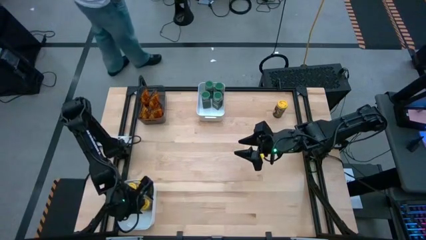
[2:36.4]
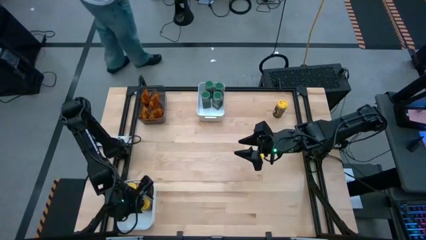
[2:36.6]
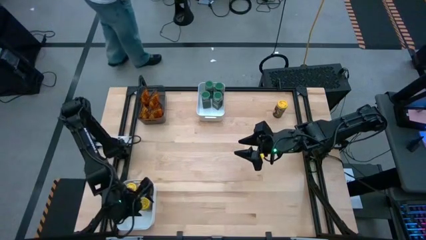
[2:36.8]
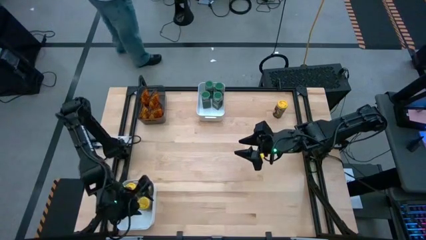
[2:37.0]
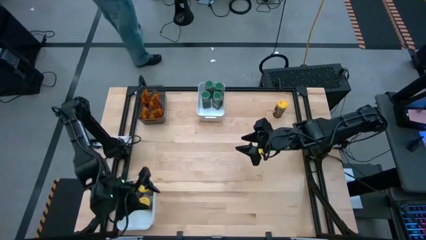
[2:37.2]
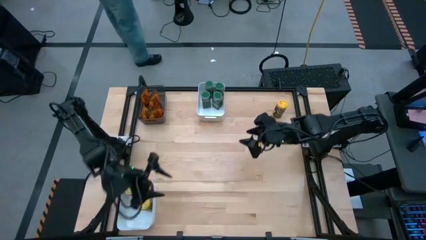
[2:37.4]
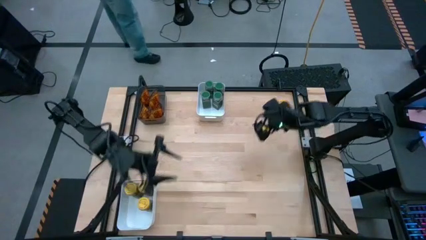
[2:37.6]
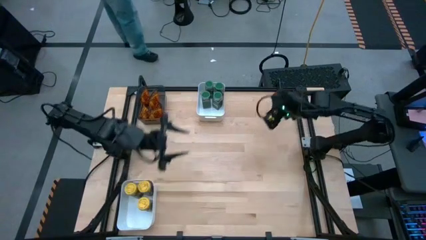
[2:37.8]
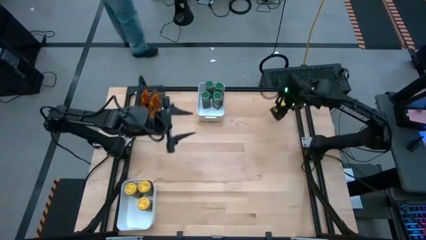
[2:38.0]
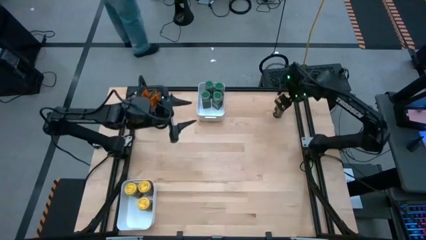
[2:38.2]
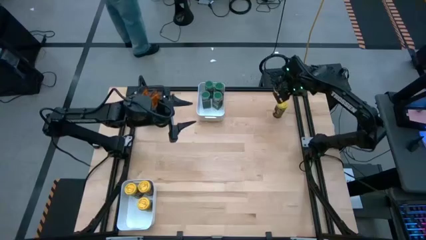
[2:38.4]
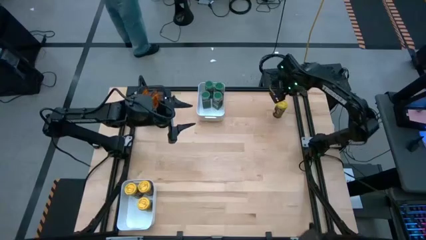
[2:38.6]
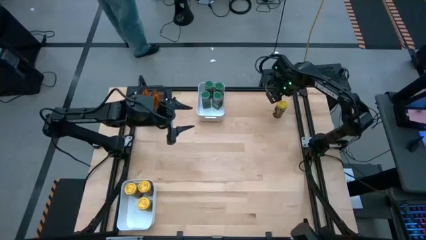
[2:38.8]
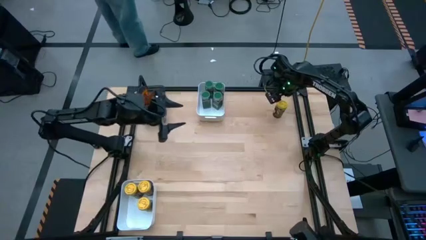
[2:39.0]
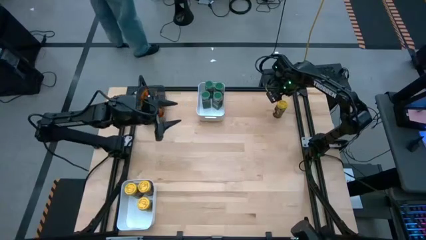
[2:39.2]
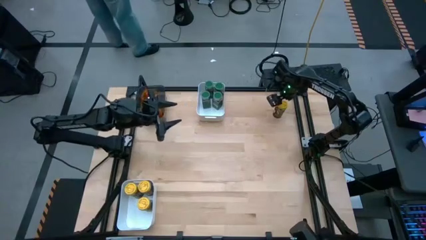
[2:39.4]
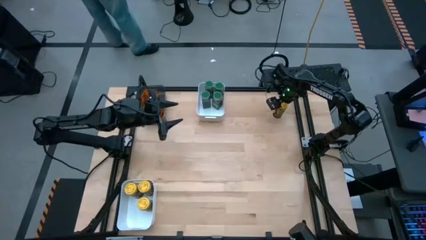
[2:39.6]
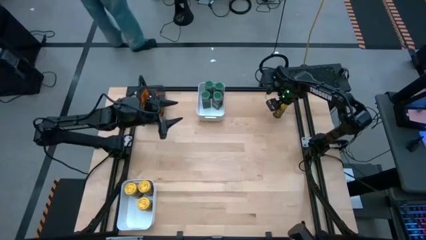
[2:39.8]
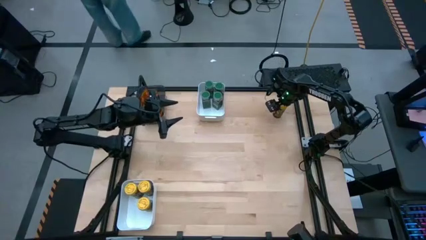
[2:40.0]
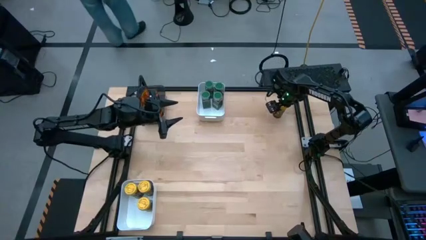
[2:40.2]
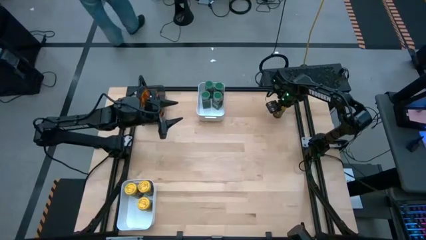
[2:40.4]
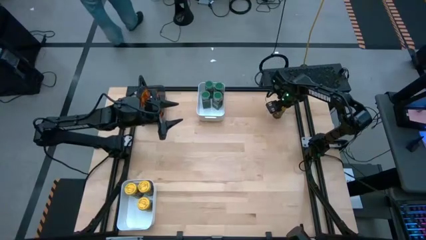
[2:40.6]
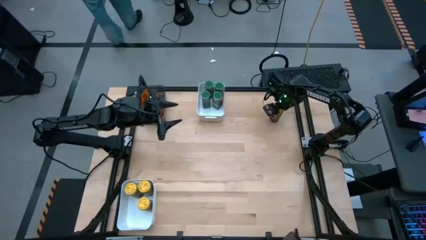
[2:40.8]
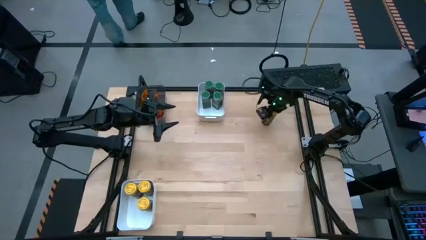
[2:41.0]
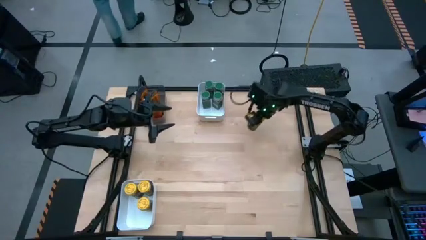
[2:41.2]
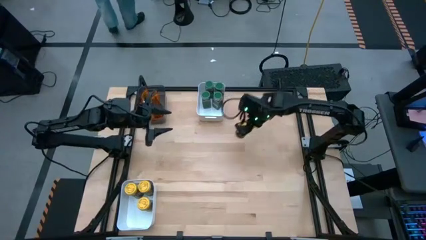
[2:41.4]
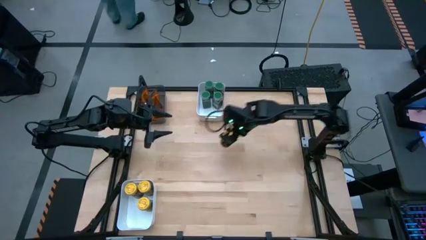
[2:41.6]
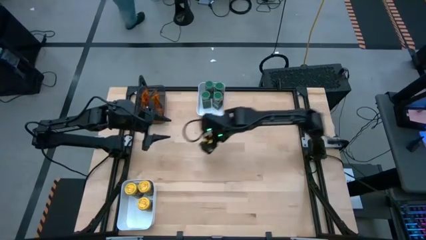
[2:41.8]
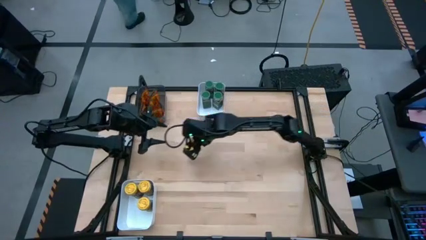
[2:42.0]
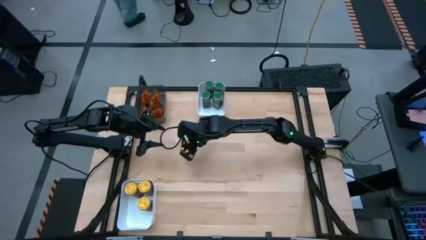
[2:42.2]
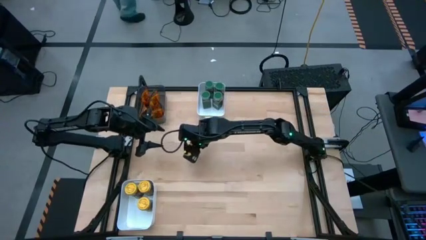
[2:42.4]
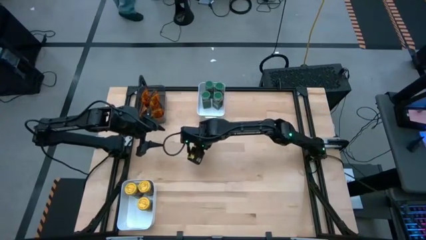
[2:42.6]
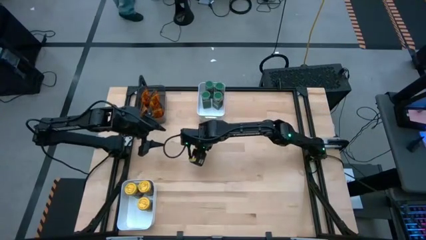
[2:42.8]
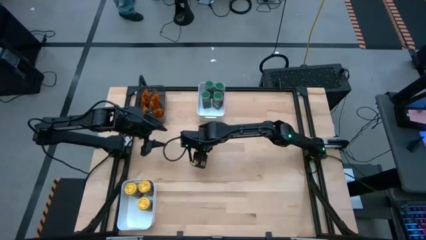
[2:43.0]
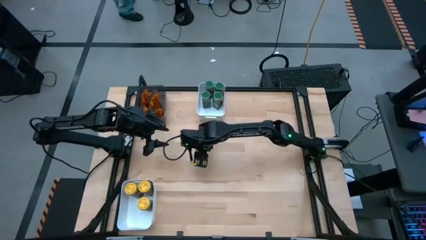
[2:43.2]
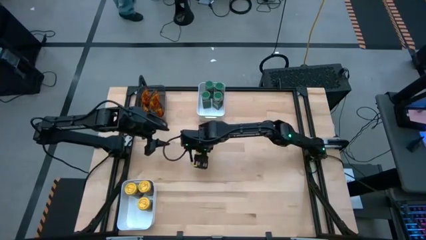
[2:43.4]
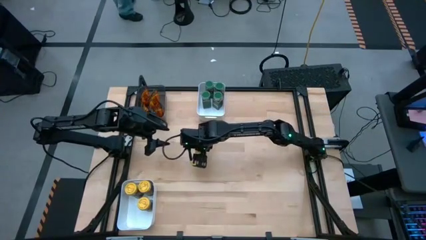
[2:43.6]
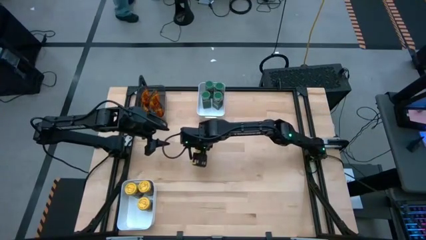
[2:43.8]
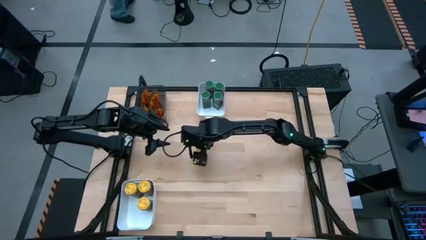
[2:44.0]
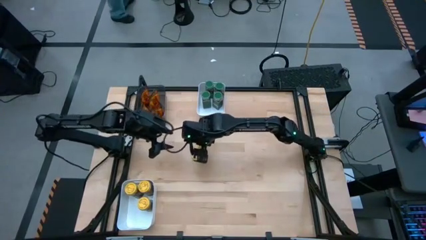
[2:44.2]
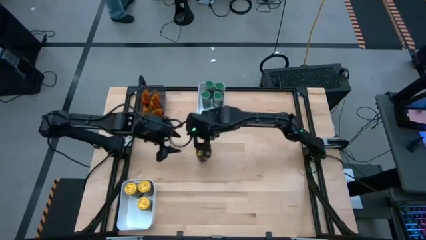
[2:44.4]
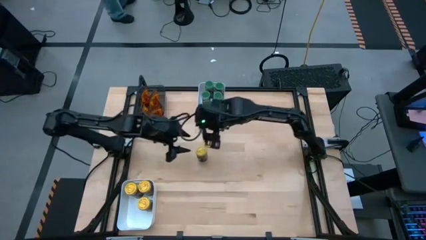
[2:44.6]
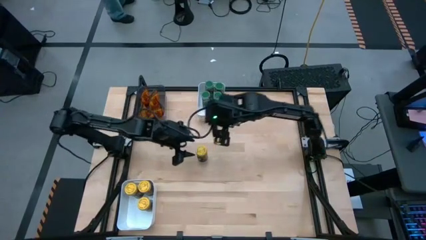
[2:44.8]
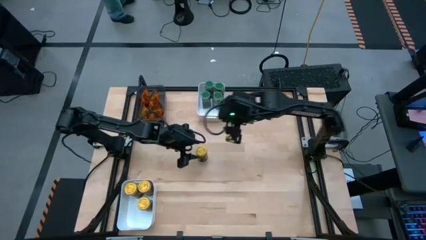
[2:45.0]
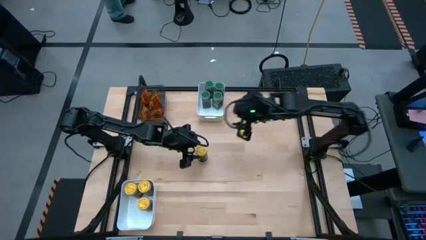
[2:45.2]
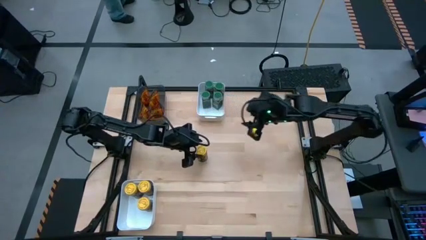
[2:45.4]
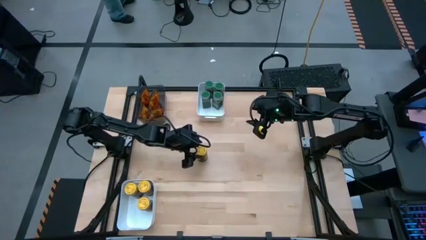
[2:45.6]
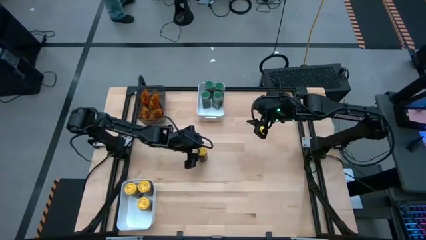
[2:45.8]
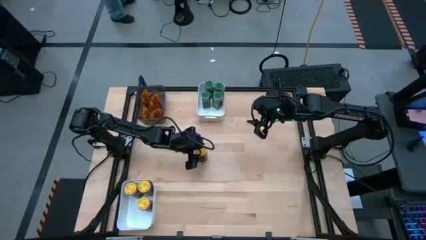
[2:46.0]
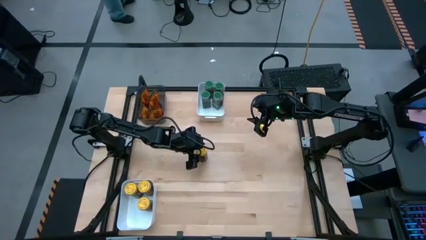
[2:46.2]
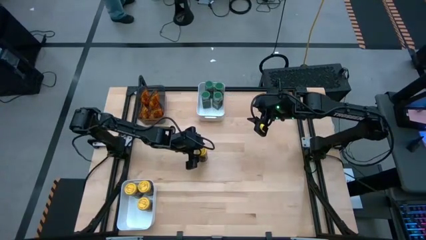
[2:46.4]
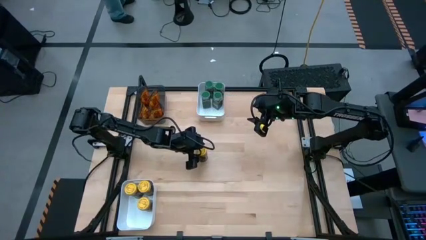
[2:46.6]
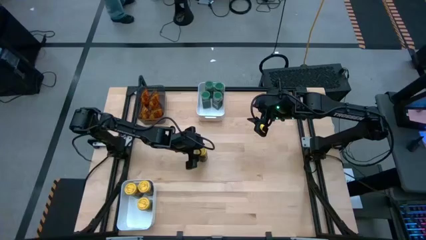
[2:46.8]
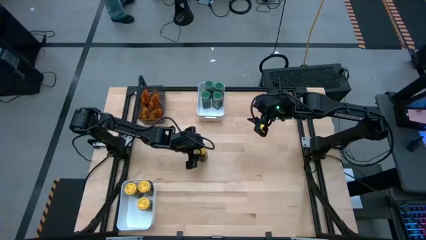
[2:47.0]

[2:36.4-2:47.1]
Task: Sort spices by type
Put the yellow seasoning bottle into the bottom white bin

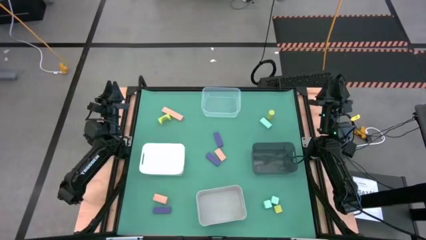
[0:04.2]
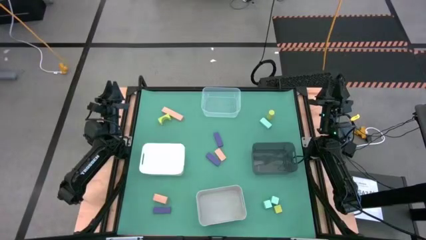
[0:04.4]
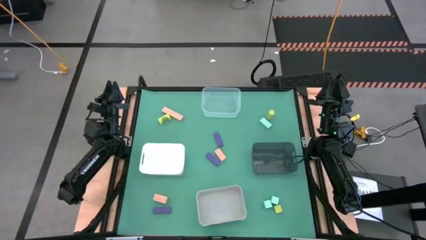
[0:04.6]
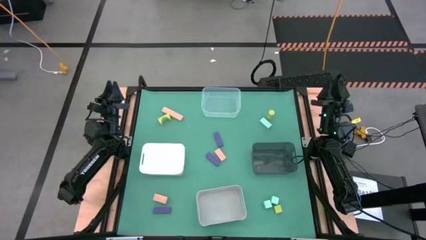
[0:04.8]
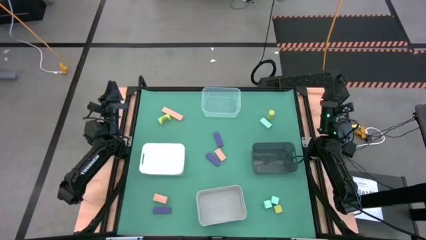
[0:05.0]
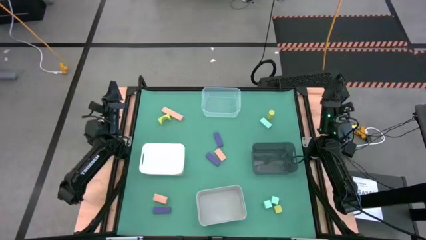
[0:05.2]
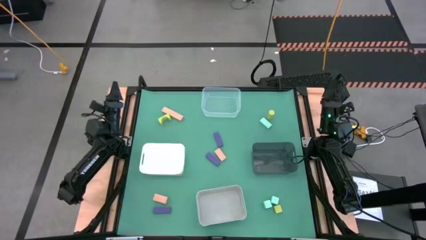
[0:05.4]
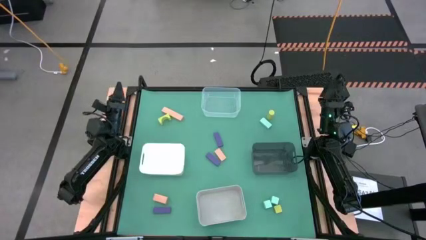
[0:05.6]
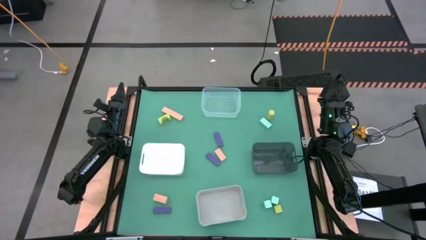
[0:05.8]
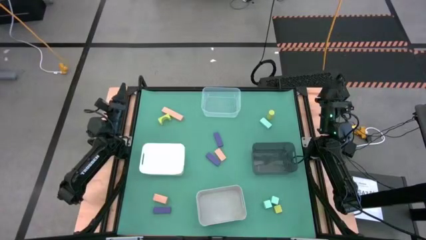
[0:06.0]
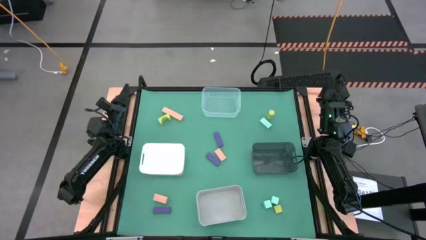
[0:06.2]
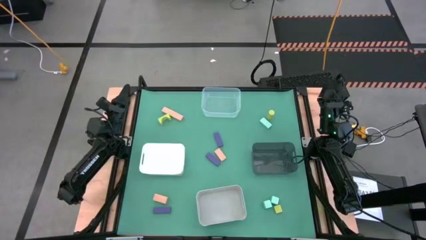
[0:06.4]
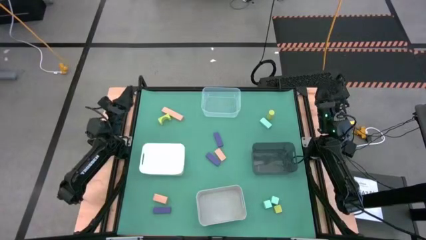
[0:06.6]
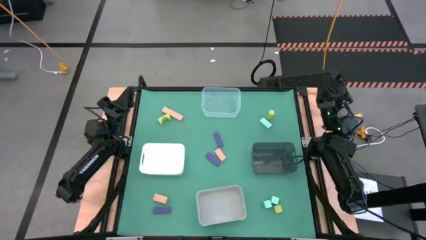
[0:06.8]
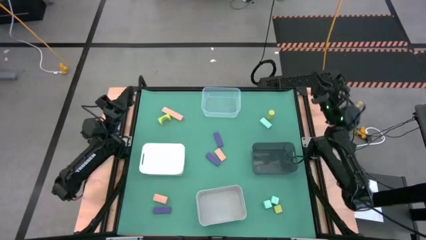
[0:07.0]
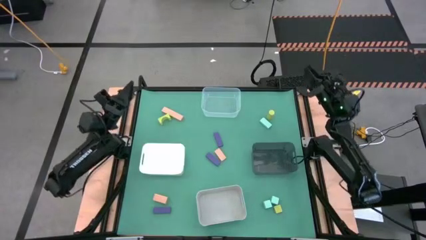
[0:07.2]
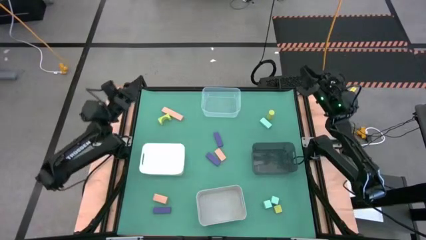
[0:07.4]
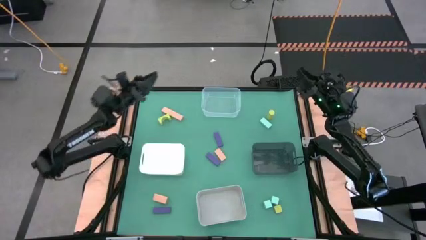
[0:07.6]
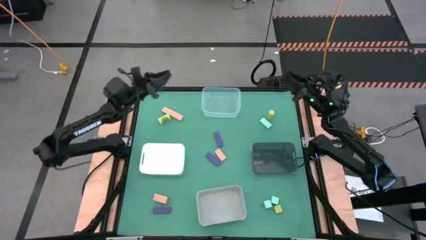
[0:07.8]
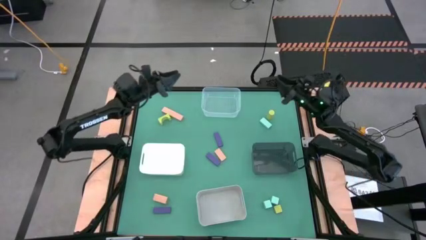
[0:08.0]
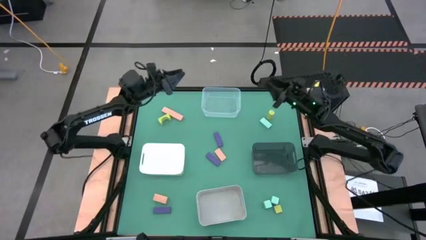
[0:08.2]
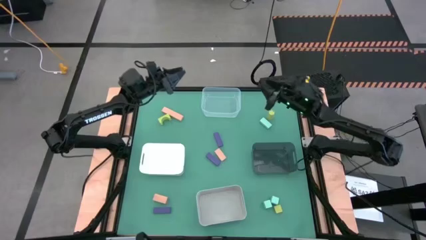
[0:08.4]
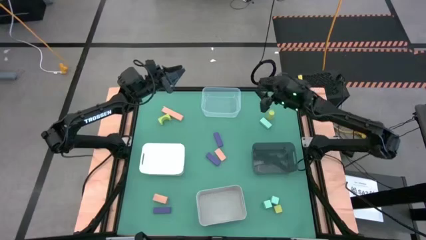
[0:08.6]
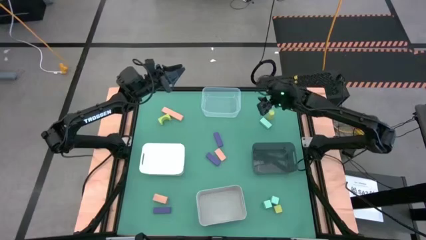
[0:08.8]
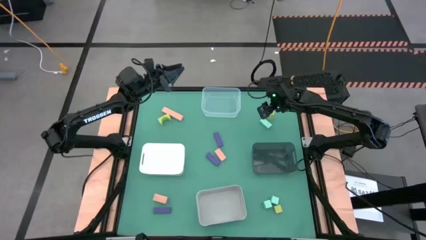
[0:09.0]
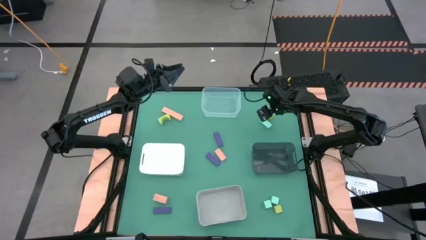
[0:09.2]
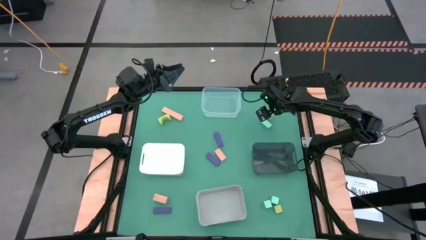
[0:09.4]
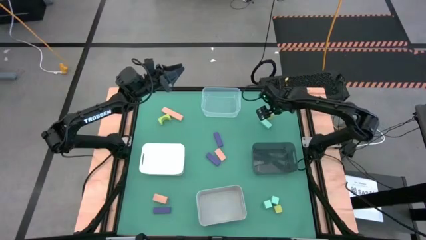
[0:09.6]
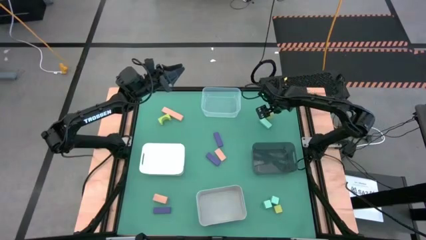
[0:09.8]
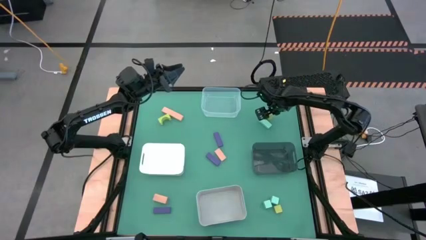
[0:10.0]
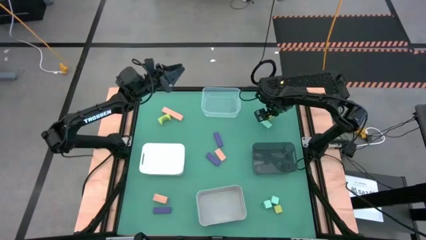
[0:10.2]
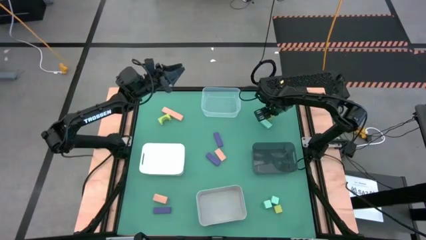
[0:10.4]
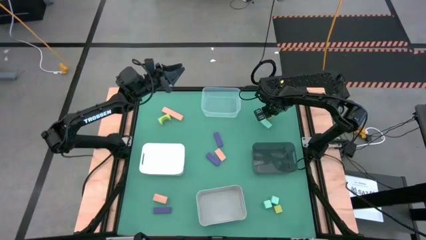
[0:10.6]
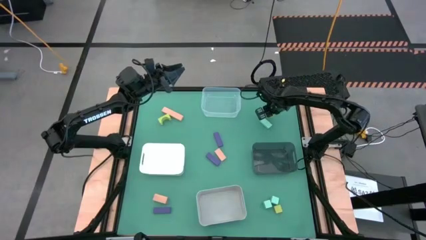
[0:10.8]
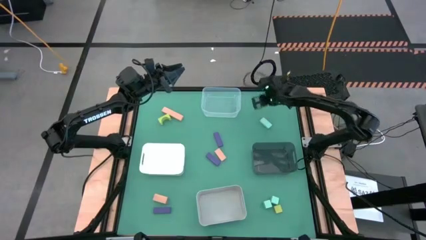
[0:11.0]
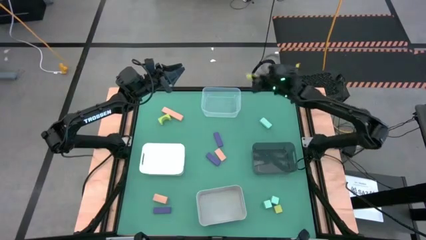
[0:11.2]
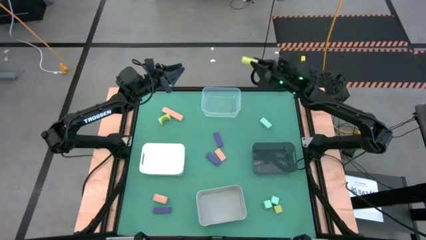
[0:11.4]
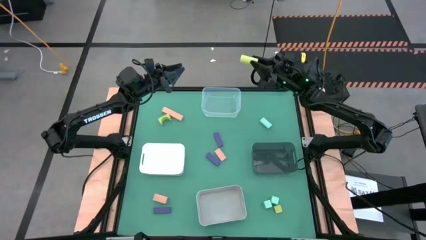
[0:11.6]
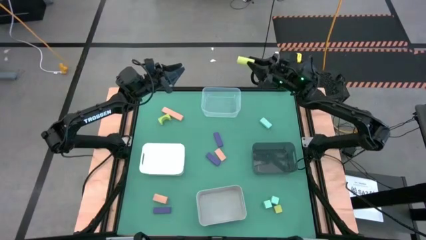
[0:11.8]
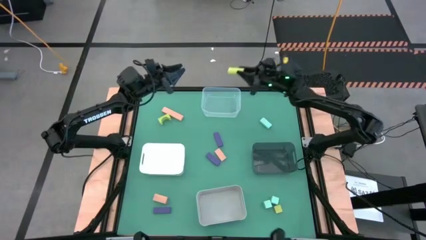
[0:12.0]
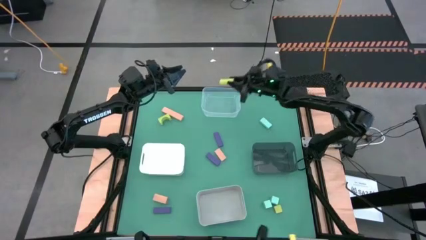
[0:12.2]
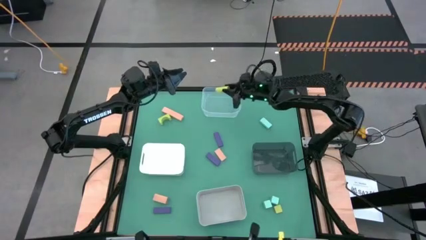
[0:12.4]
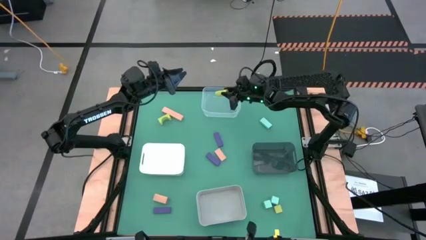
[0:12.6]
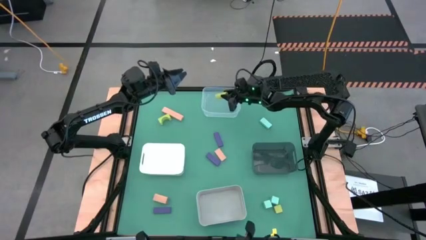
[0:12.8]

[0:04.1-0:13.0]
Task: Sort & place blocks by color
Put the top right green block into the transparent bin
